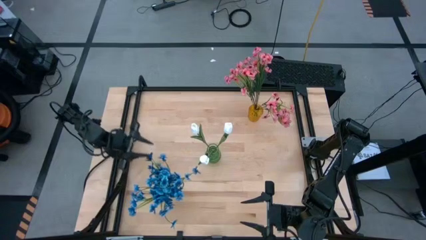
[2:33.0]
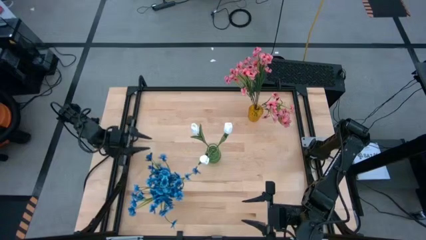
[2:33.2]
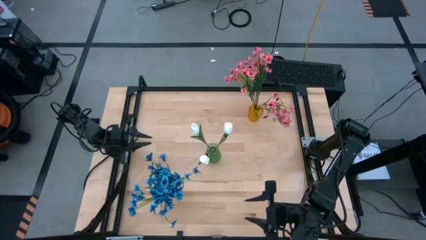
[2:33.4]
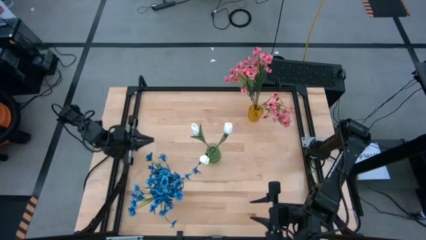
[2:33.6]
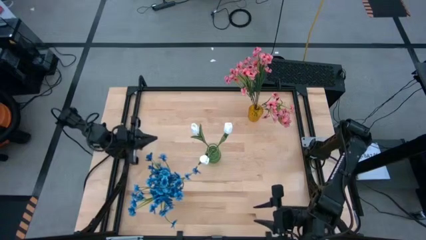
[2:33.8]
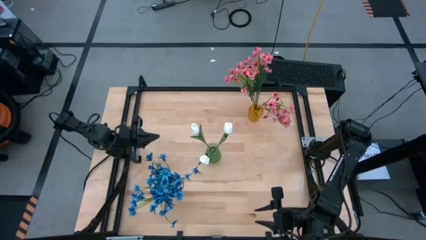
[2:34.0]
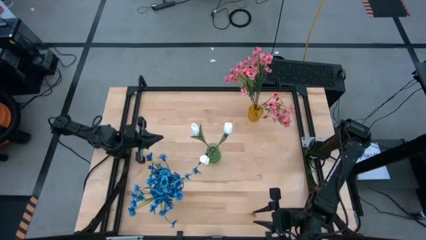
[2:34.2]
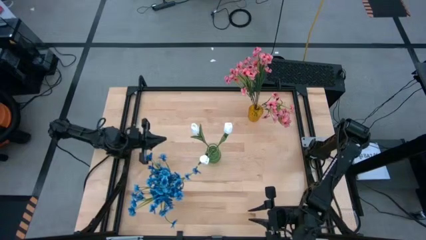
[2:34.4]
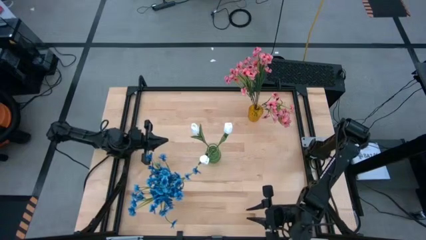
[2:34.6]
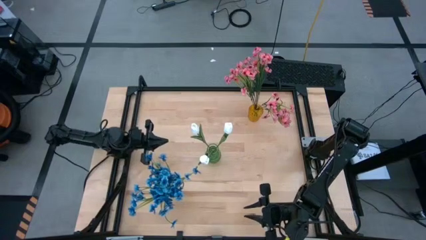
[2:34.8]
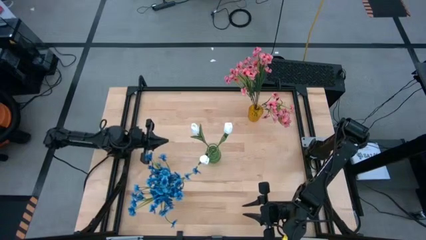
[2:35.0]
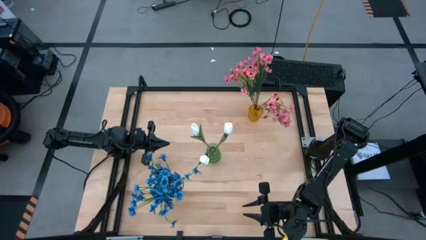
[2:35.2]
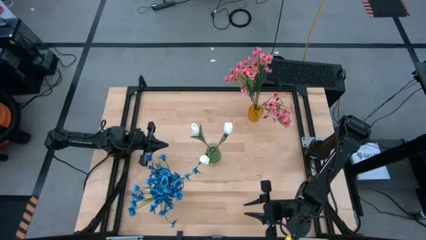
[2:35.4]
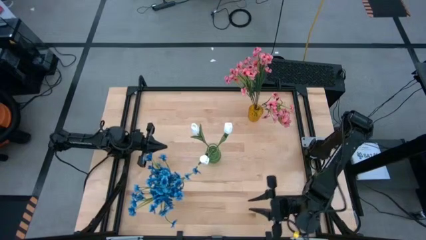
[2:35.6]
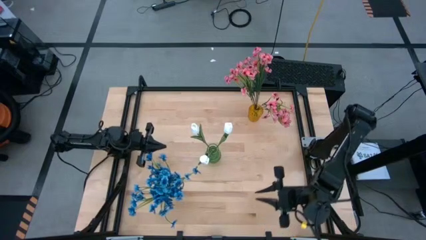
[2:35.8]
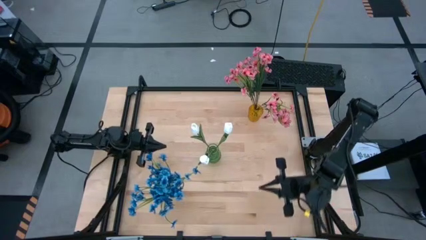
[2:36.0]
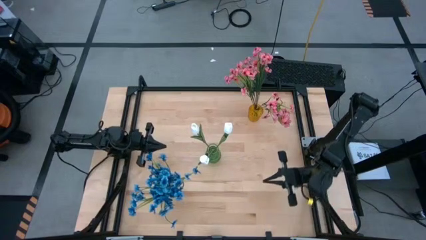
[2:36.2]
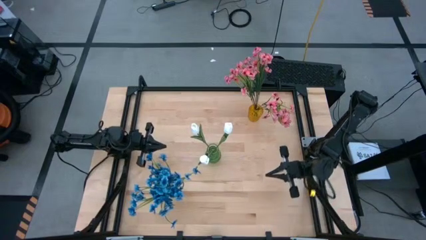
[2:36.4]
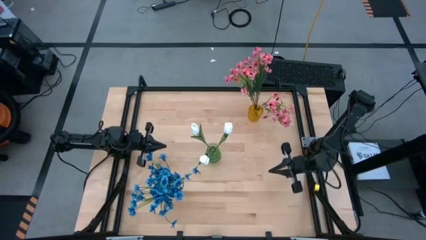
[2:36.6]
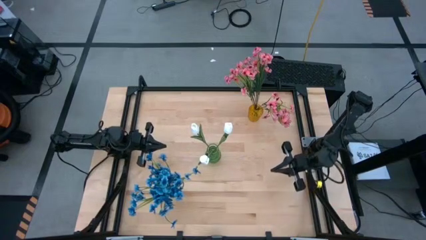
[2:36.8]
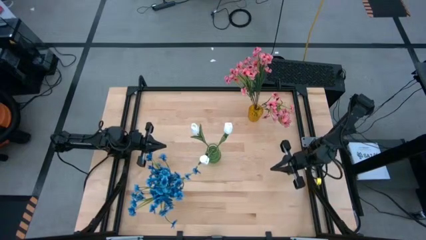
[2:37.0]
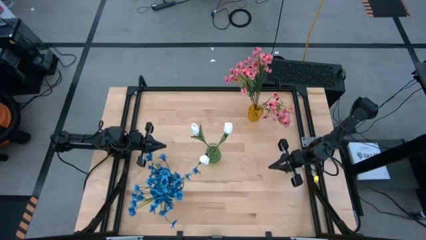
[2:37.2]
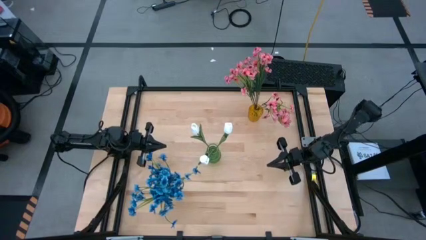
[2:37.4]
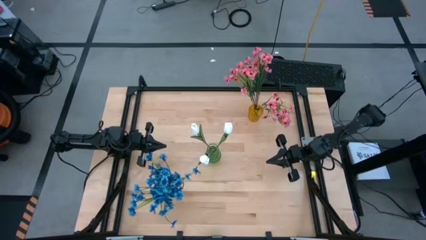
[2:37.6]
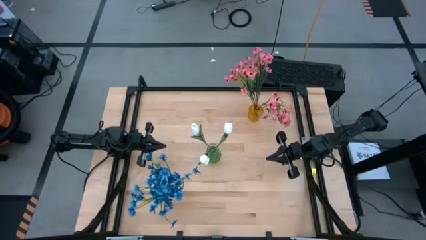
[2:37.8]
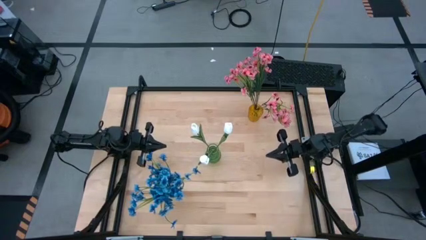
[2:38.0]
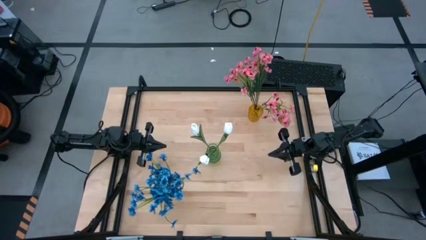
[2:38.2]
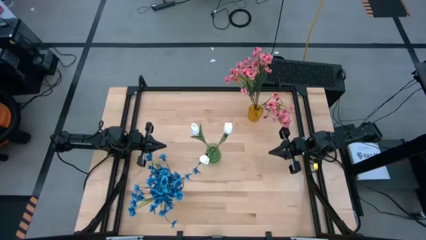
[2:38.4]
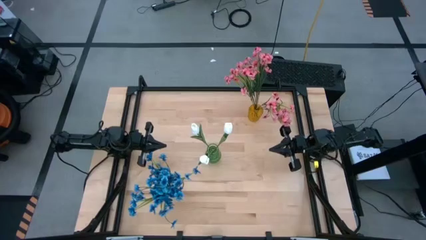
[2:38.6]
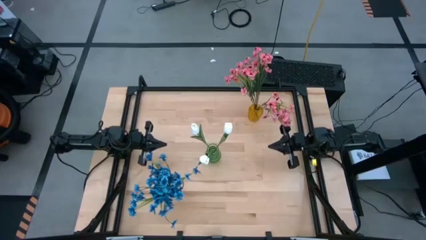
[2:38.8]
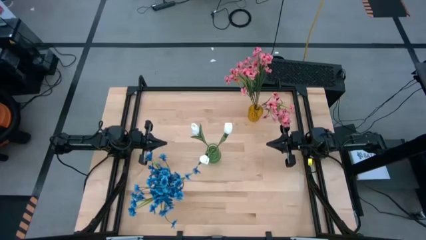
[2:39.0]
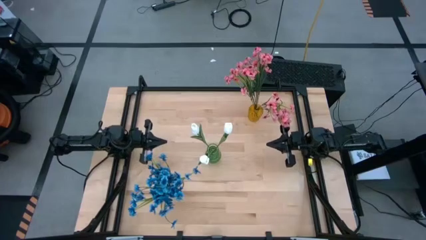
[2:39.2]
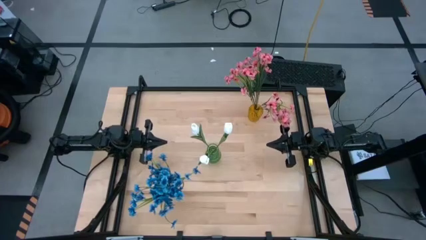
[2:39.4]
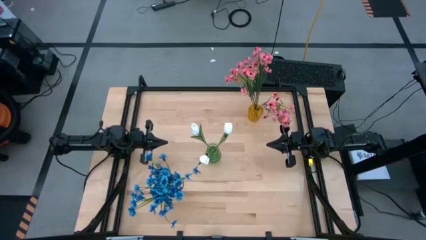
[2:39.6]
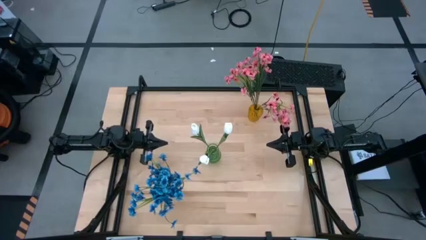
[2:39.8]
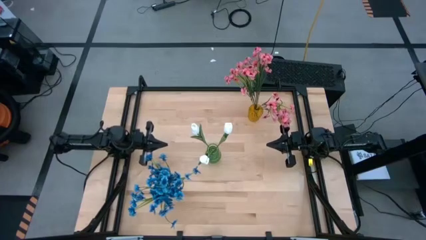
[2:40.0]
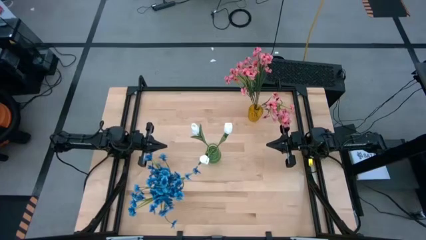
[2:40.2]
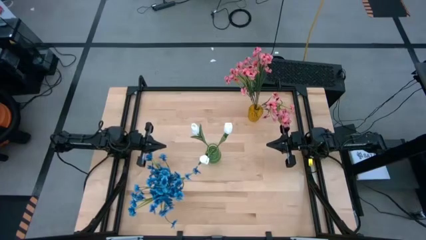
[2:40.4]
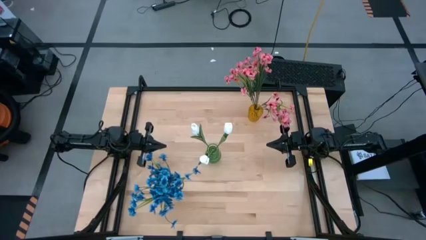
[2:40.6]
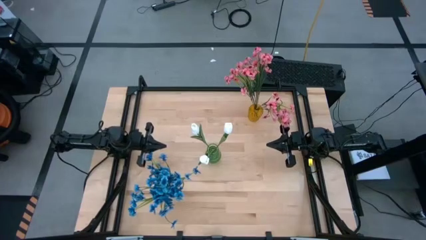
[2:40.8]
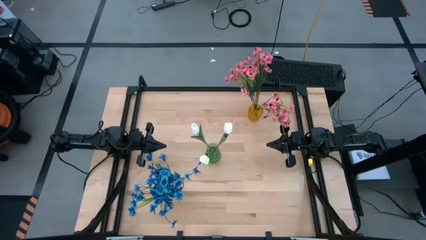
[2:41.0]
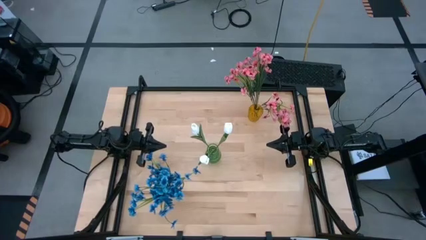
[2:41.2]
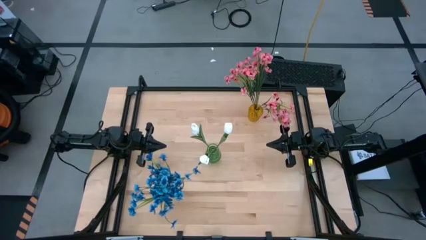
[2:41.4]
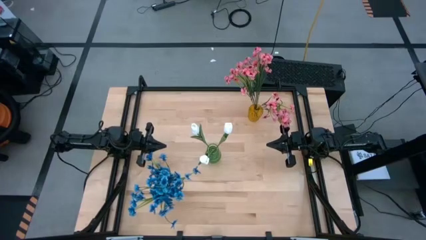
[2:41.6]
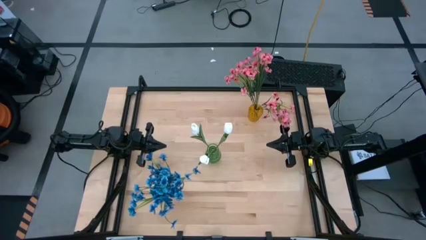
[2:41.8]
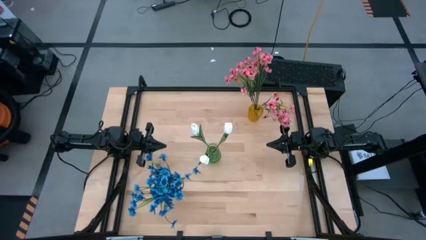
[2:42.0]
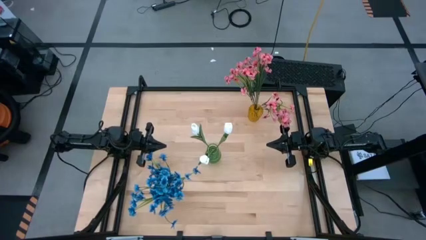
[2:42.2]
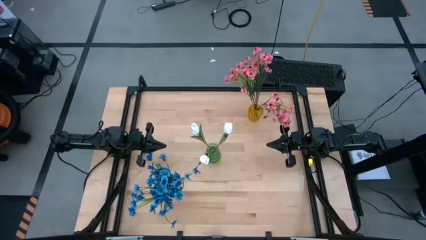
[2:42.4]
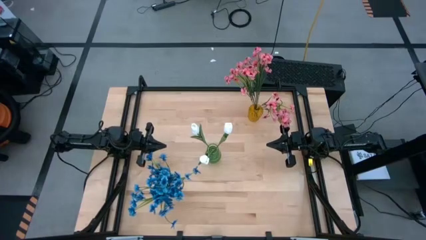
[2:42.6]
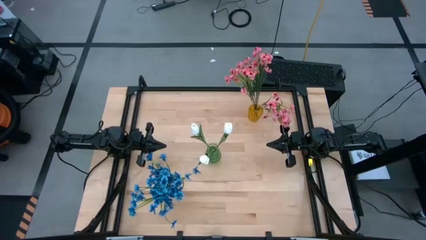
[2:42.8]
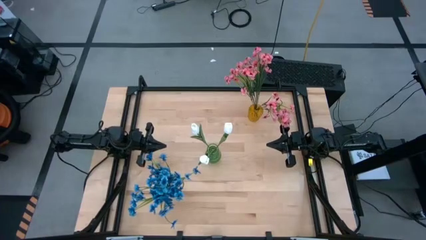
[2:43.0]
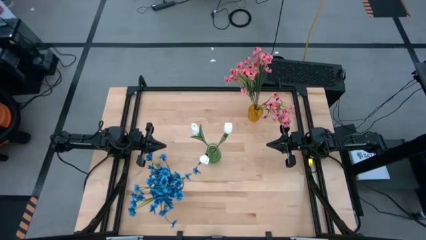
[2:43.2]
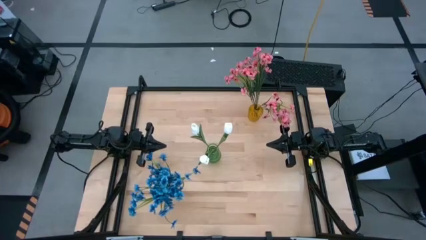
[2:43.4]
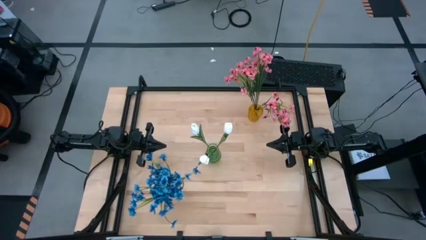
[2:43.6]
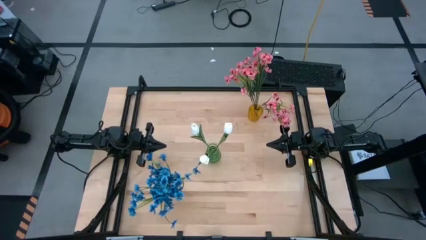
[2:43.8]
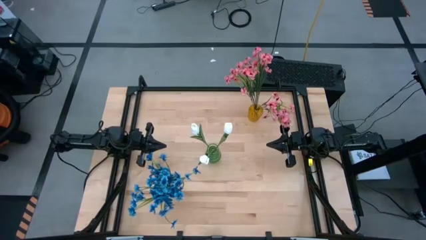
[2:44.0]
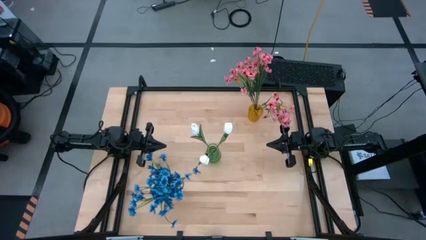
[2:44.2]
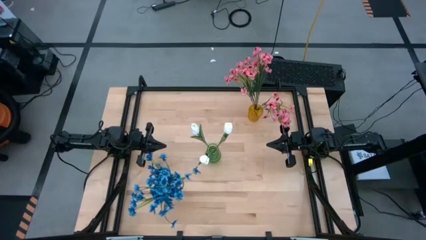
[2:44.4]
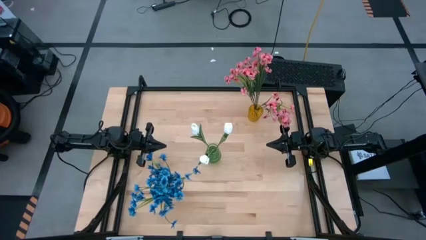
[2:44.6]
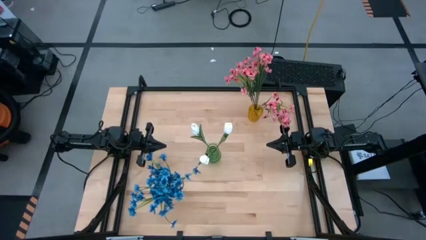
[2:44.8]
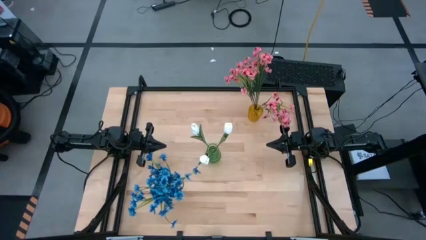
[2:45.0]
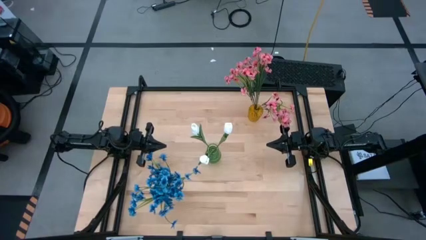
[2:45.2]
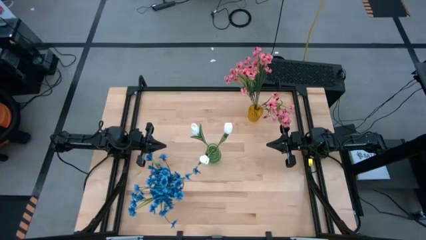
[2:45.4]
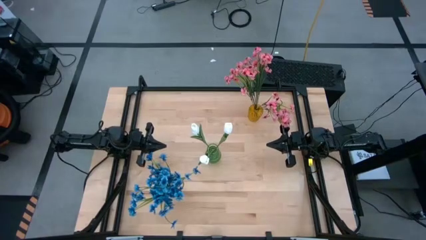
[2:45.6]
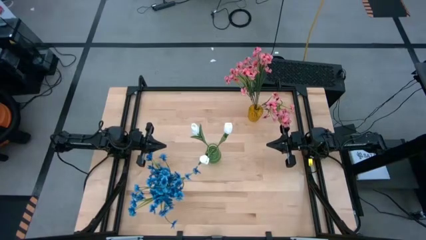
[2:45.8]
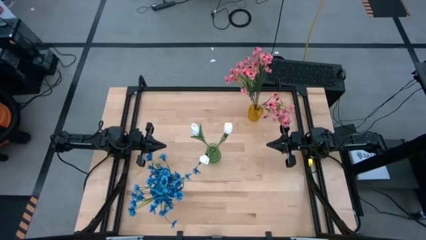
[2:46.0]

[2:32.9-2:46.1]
Task: Sort flowers into vase by color
Return to Home Position
